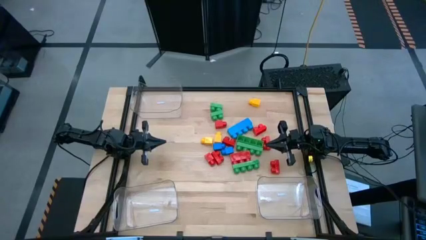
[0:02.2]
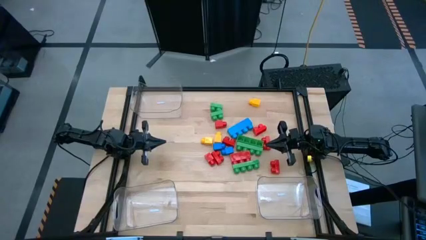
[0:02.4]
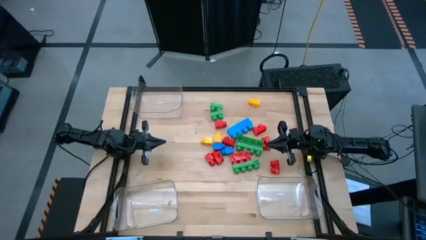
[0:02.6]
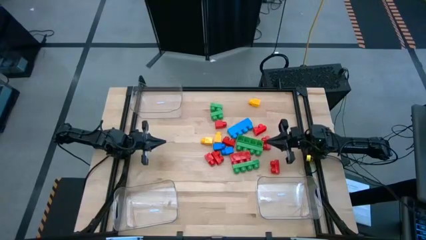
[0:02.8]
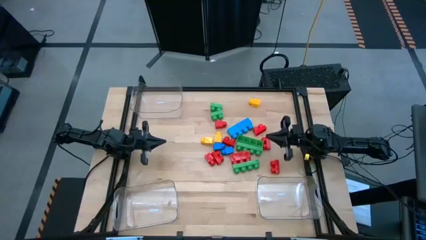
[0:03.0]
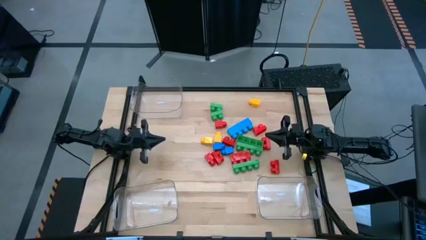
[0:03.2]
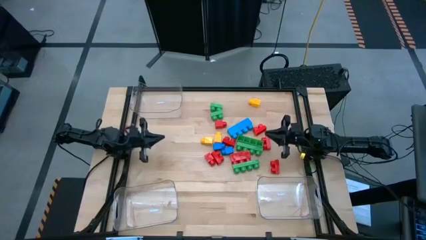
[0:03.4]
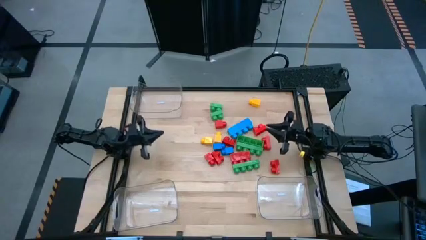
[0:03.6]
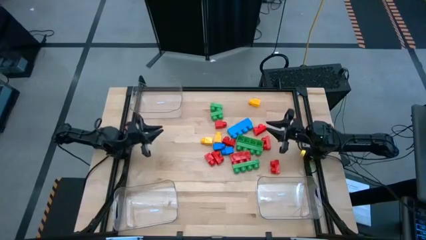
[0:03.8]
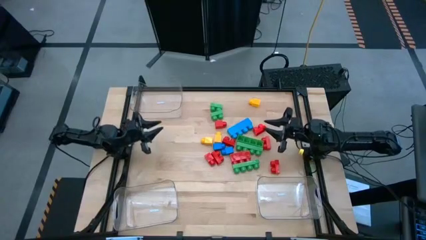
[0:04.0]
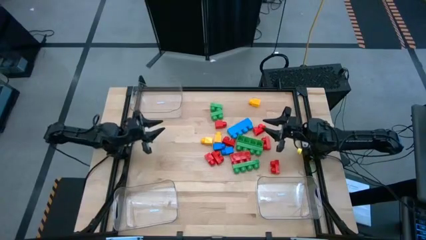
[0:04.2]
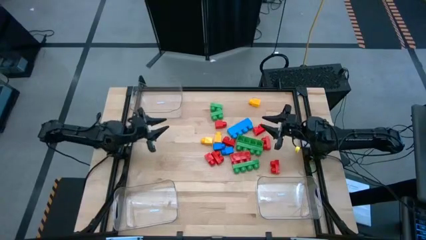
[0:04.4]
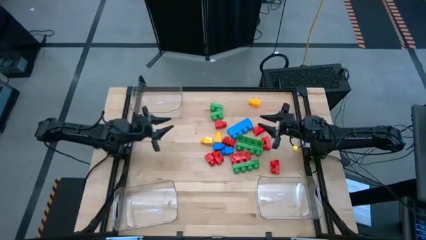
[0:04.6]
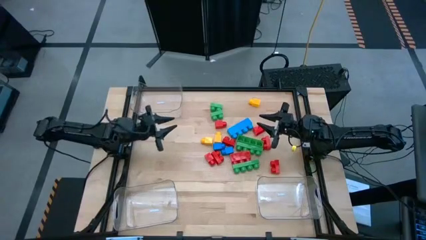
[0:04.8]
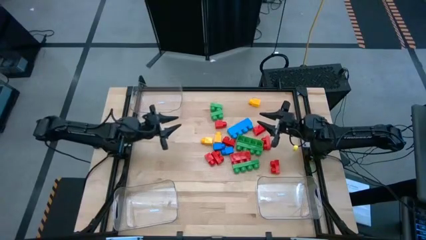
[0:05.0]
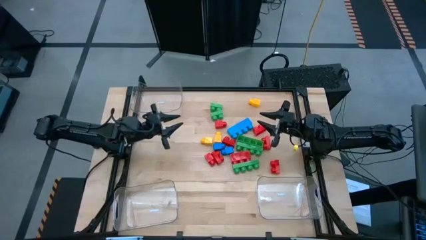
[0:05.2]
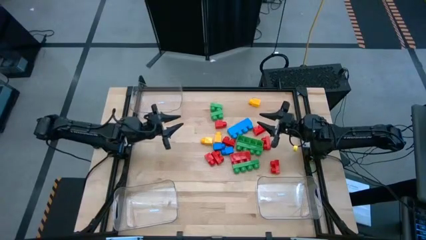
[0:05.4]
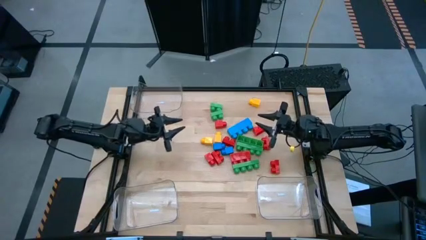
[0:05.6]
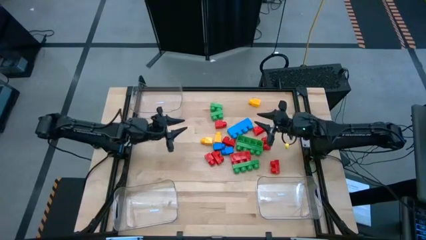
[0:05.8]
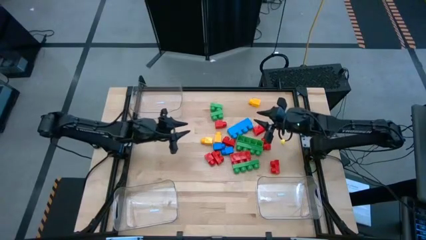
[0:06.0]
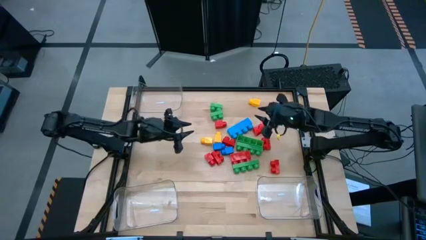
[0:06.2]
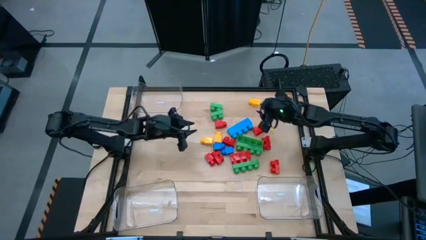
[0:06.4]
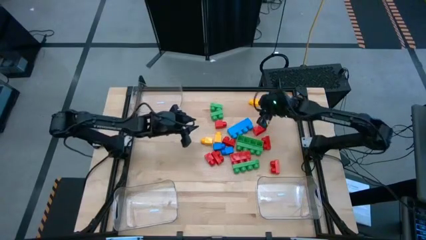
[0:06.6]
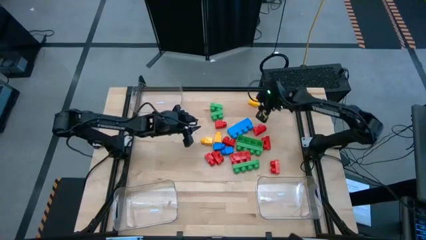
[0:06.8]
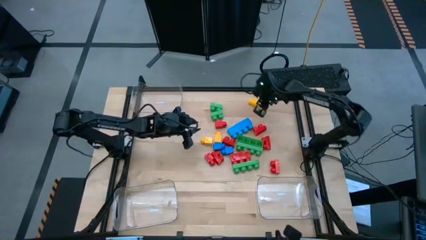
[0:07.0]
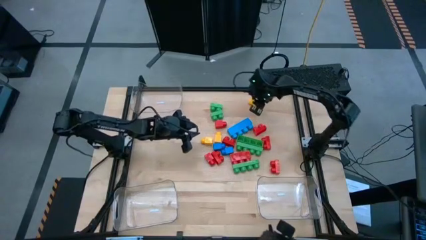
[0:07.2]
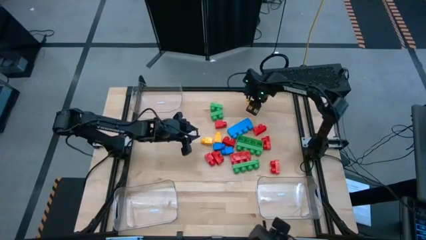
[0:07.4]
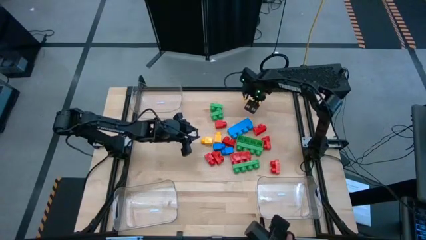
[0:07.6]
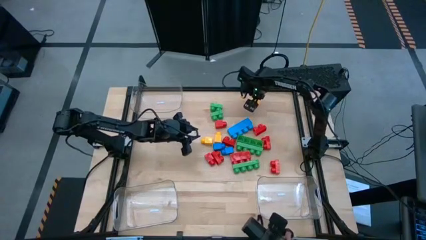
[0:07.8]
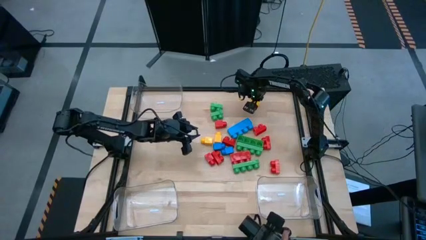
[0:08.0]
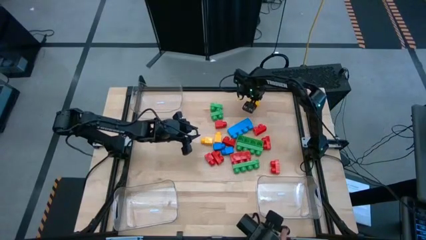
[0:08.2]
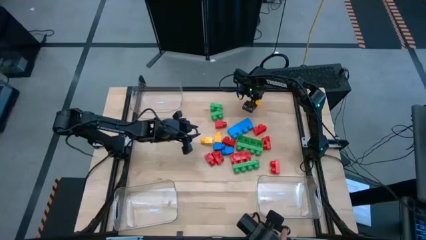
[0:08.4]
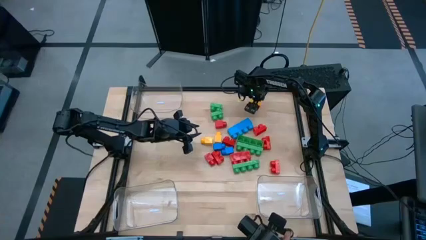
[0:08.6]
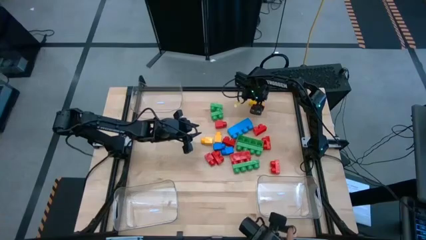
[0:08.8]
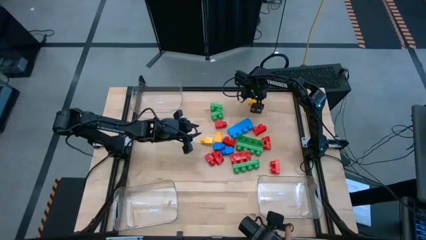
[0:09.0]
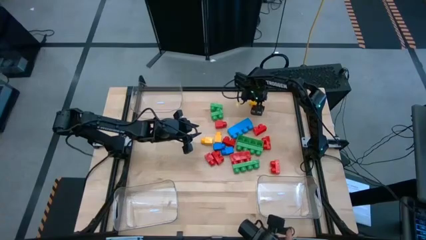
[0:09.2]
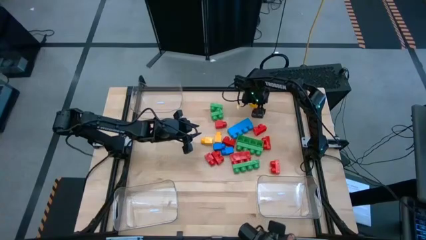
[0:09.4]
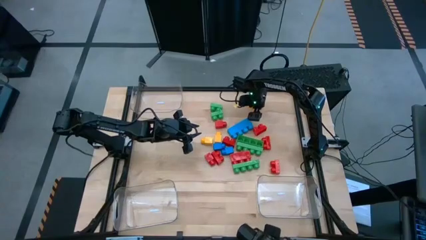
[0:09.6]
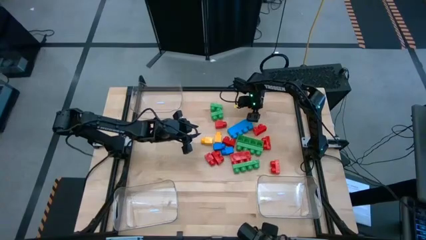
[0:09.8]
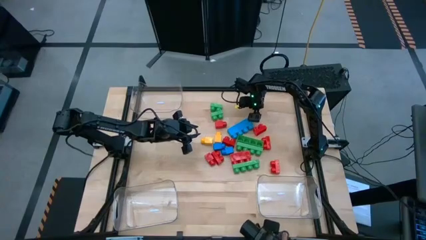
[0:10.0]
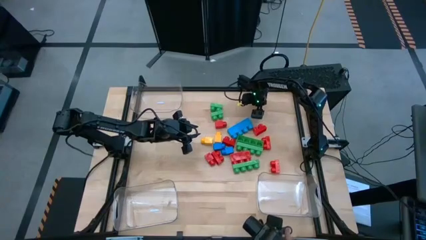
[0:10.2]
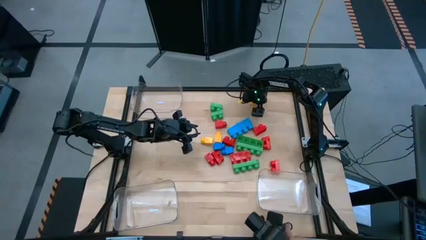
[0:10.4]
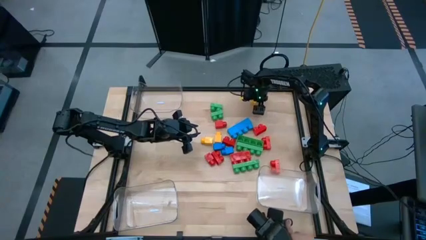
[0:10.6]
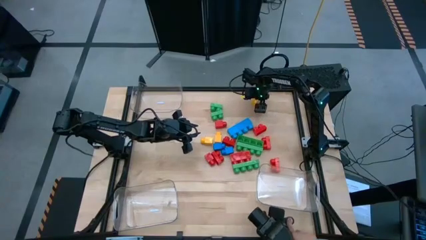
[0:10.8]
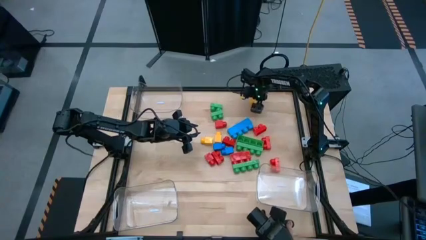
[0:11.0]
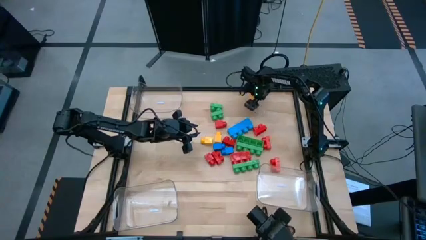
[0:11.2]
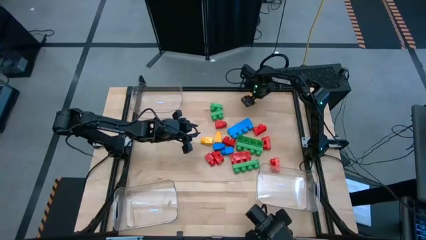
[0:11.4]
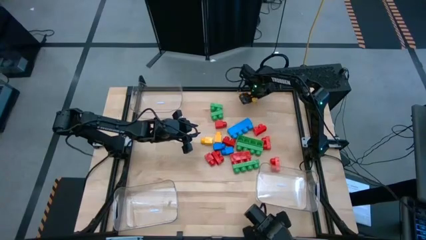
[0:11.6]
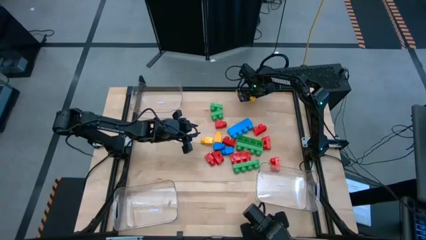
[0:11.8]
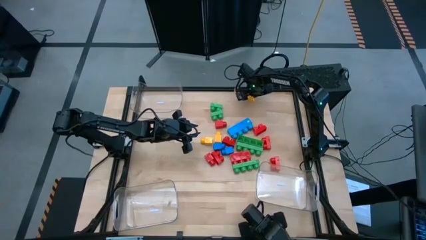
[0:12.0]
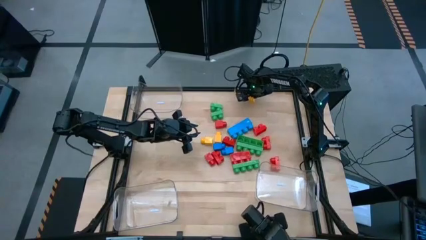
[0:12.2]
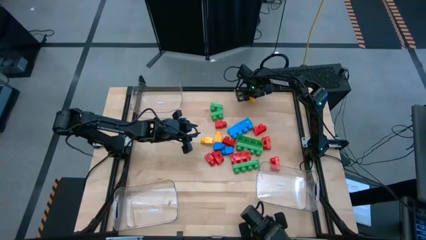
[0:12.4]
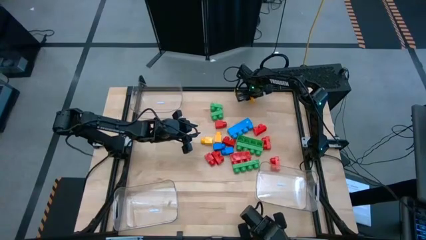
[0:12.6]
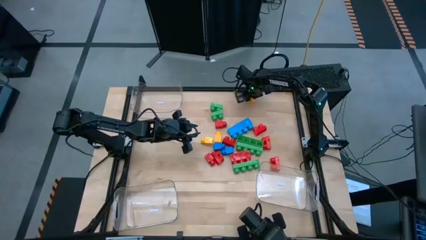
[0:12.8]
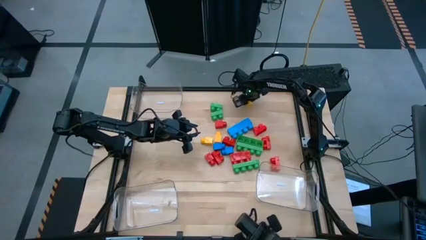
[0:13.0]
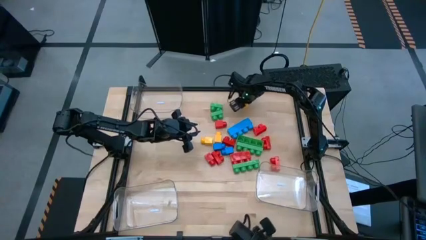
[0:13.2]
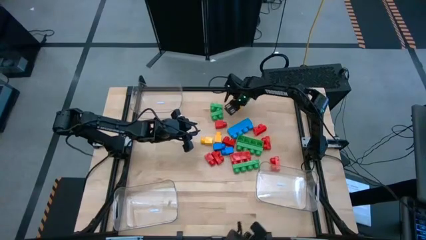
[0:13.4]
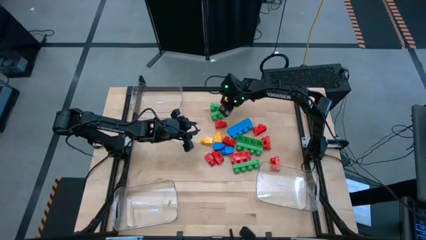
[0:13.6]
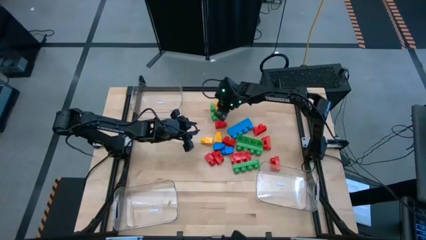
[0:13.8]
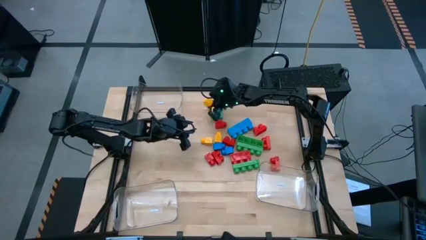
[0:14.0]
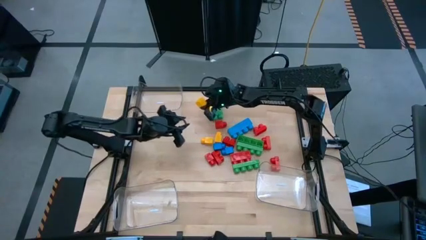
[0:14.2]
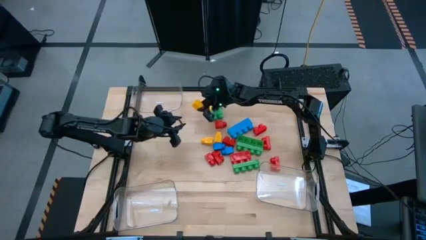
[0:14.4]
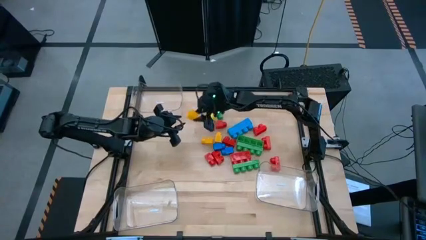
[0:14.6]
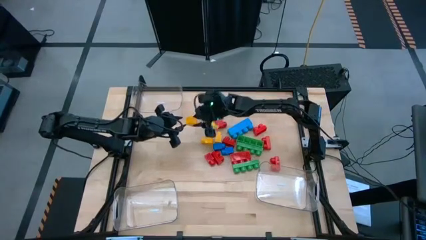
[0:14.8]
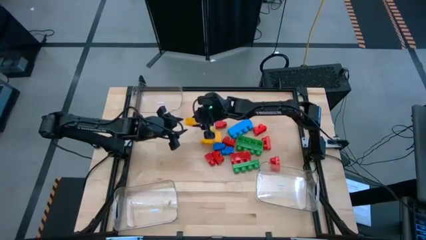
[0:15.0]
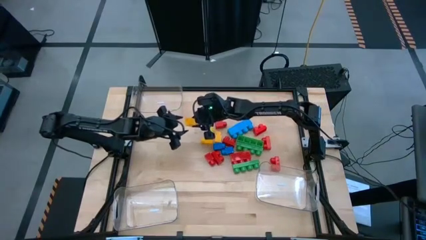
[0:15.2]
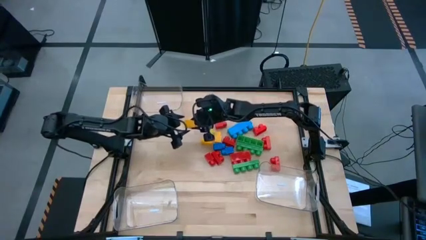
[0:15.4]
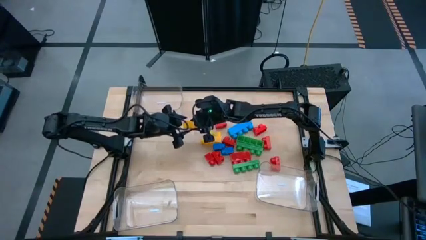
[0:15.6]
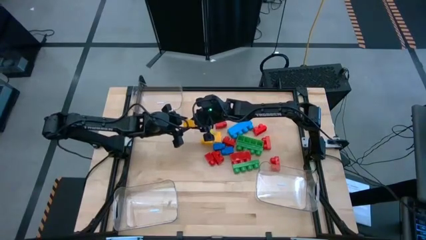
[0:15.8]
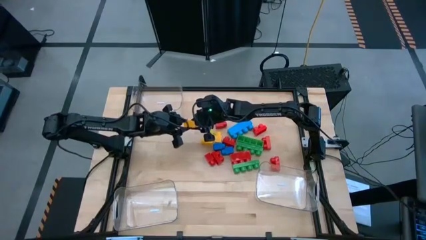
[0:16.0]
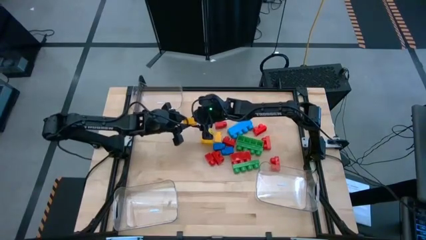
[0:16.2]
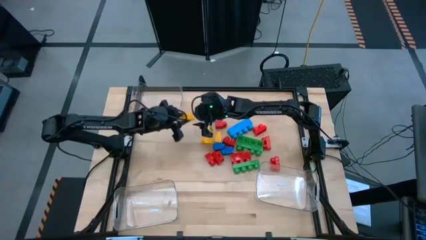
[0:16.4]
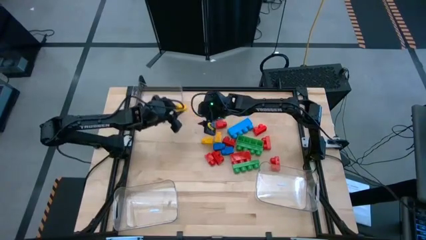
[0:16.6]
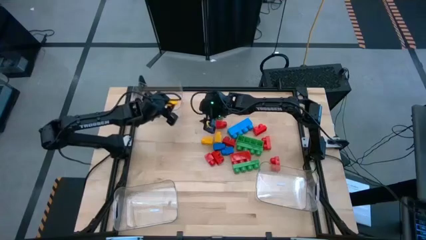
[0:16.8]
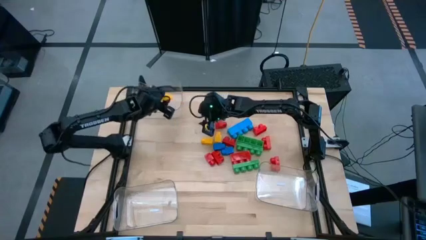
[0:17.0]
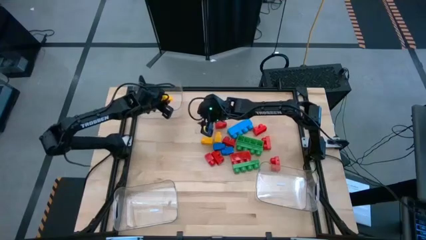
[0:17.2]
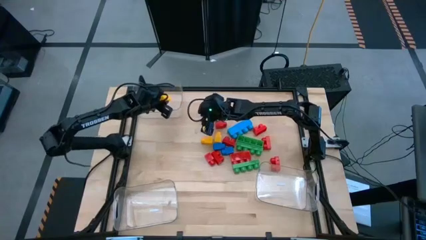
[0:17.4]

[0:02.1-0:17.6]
Task: Sort blocks by size
Put the one-stud yellow game piece into the top transparent bin
